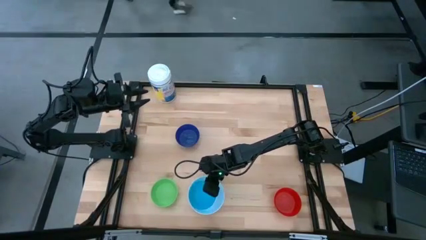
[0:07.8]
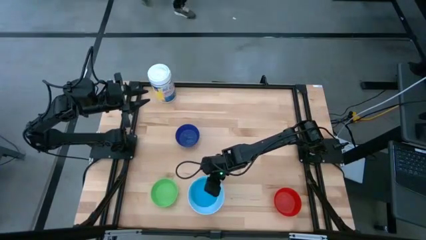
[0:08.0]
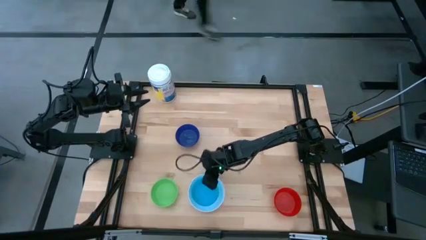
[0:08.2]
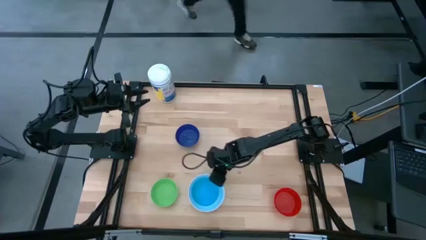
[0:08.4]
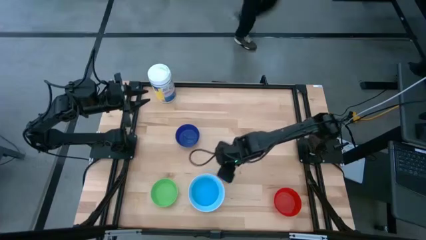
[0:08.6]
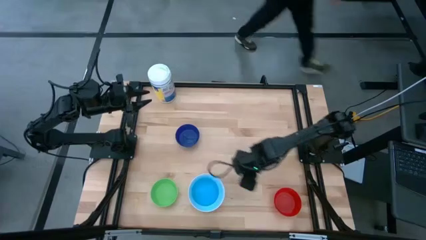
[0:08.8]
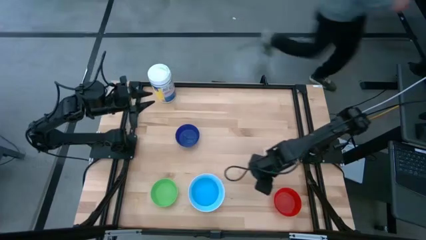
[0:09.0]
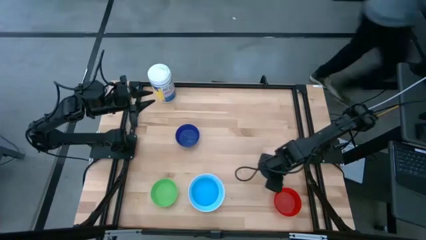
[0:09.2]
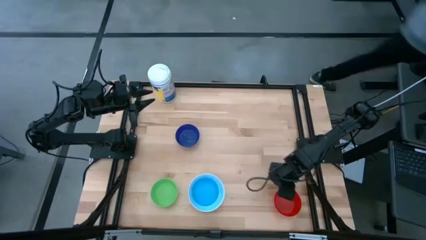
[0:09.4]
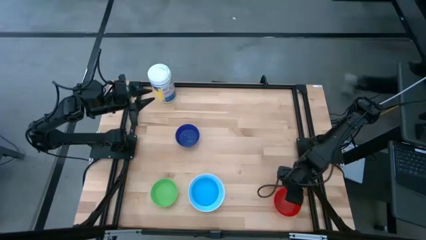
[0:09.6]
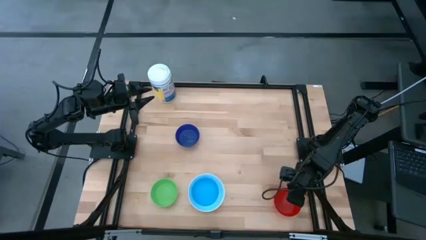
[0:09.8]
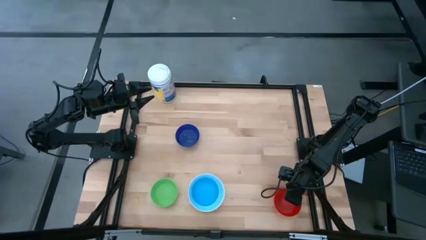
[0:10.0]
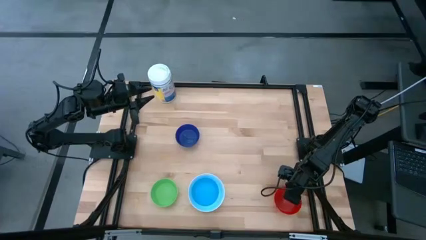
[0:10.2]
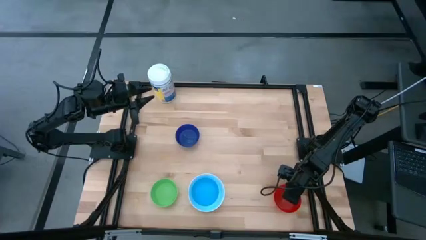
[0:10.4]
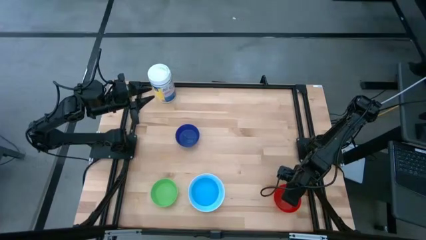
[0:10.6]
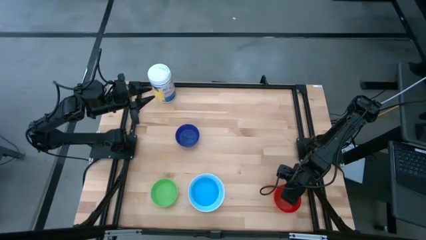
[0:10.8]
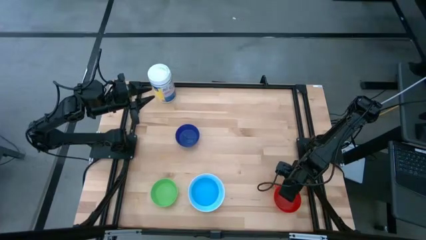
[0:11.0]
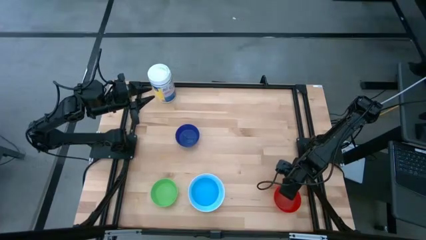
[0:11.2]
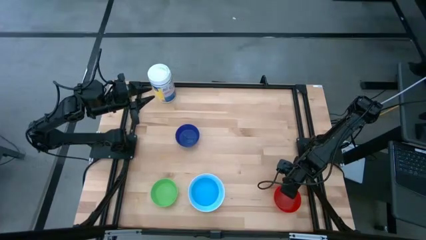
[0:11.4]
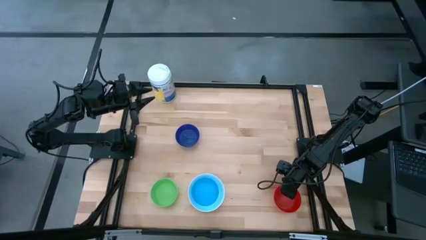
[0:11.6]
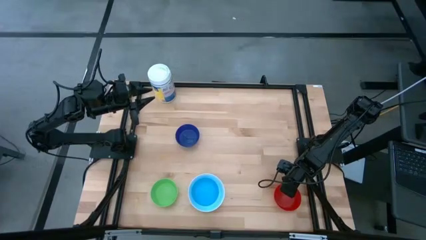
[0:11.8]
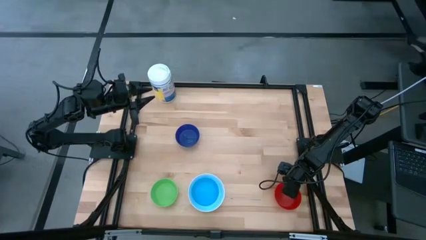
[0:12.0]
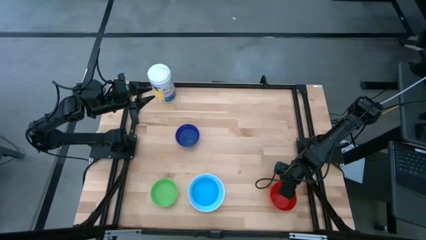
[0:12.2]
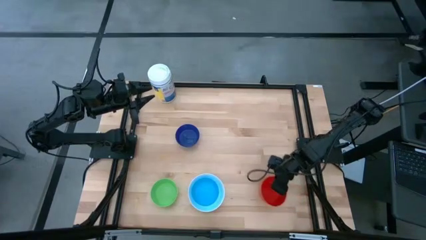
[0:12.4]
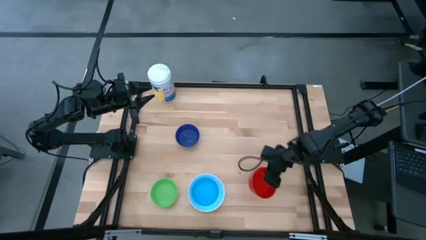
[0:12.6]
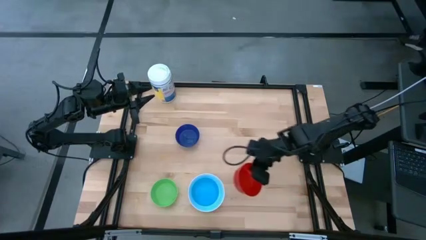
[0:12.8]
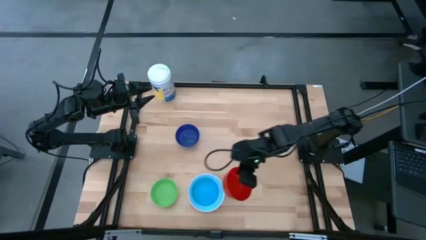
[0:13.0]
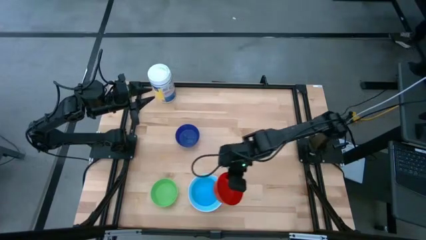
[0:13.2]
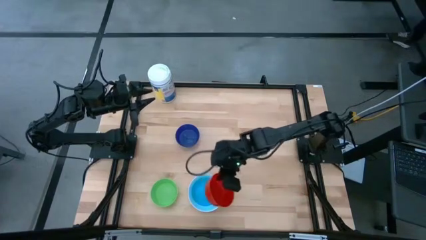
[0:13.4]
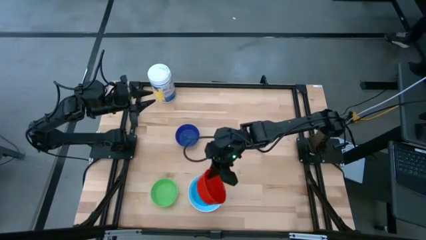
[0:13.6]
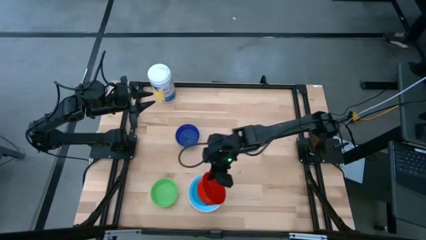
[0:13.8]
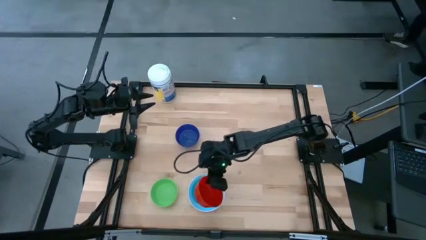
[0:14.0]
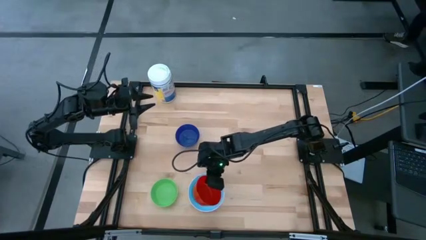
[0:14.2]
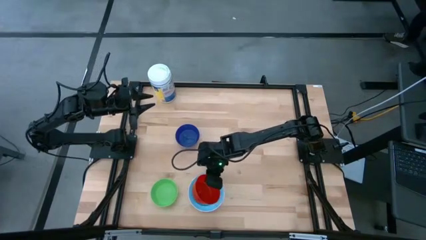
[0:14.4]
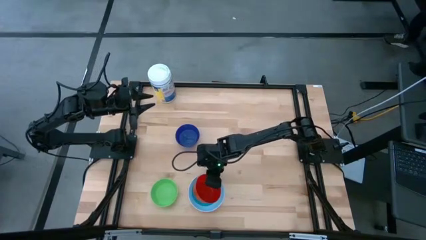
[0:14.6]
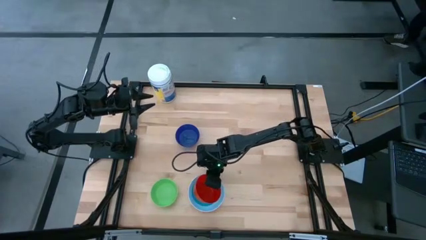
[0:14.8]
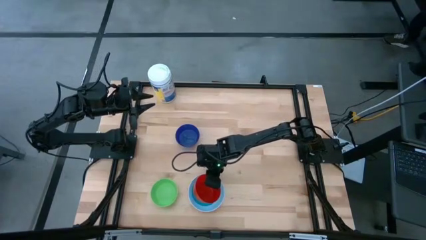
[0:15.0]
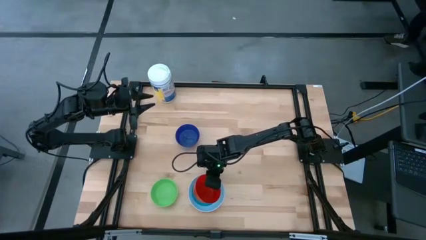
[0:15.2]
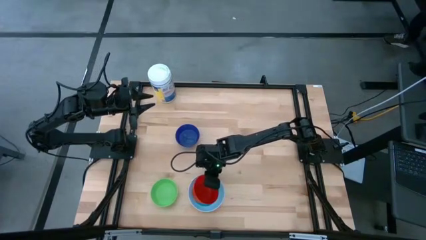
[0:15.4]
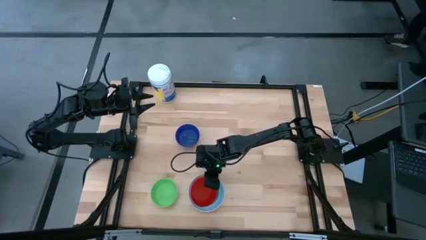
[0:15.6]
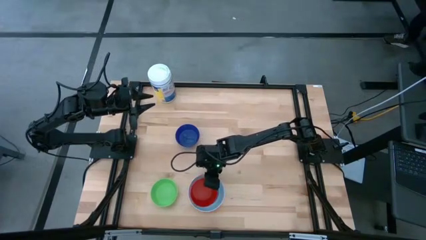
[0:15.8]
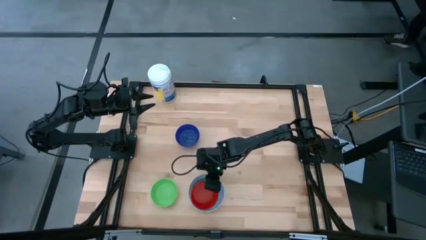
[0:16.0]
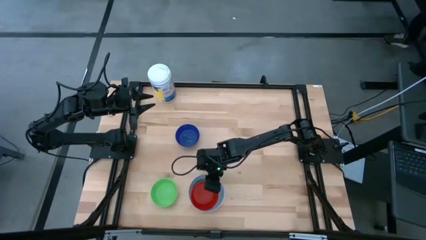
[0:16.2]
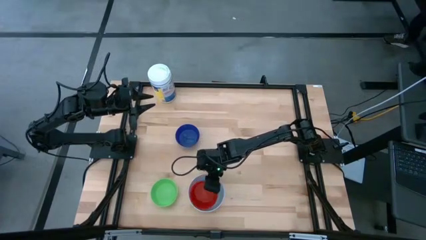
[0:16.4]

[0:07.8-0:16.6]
Stack the red bowl on top of the light blue bowl

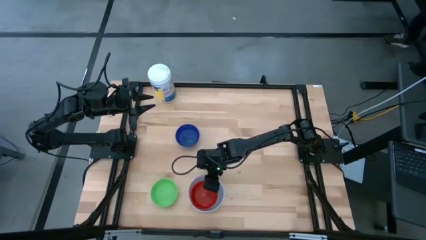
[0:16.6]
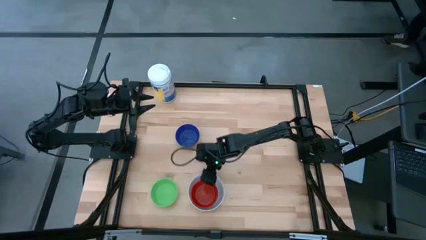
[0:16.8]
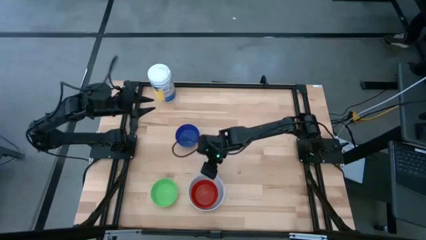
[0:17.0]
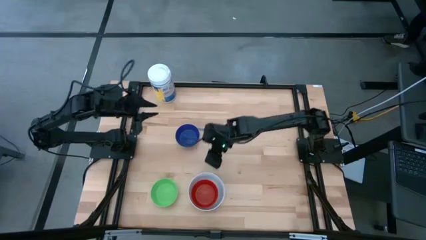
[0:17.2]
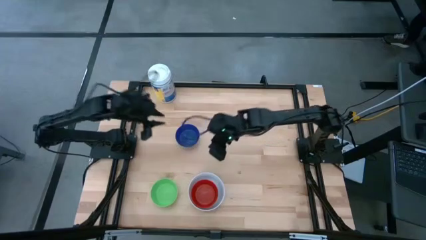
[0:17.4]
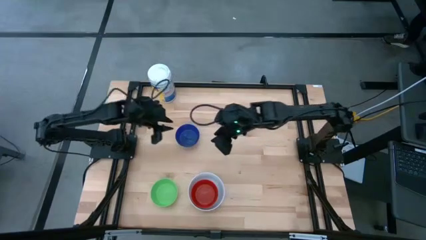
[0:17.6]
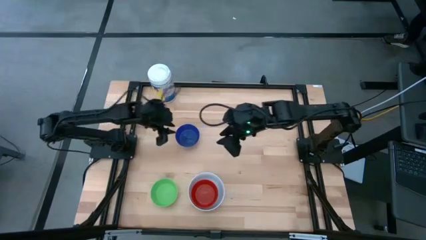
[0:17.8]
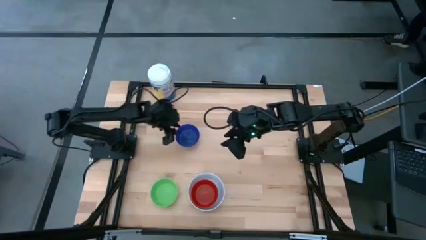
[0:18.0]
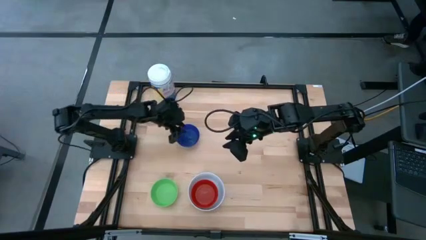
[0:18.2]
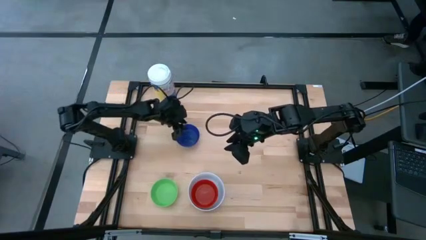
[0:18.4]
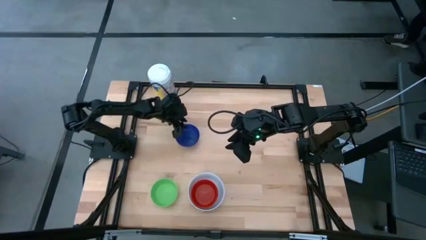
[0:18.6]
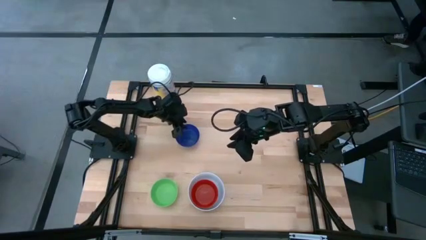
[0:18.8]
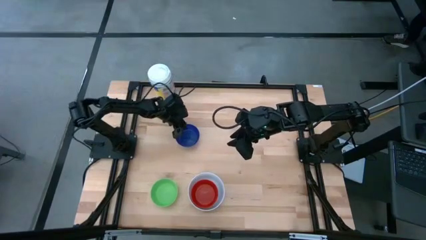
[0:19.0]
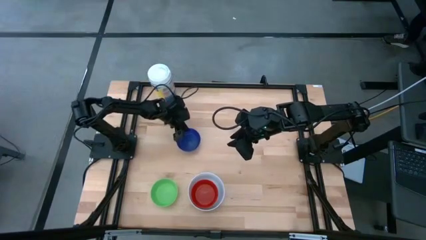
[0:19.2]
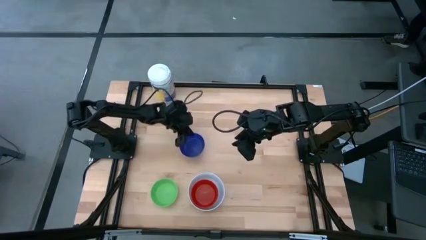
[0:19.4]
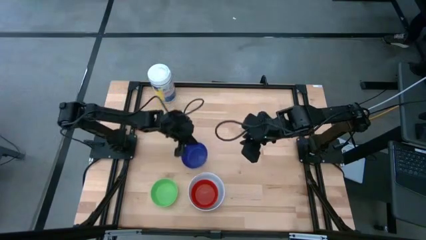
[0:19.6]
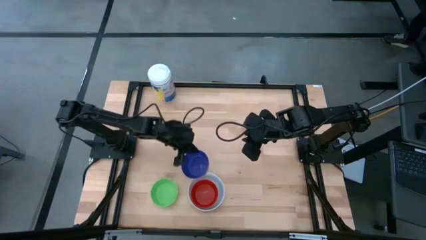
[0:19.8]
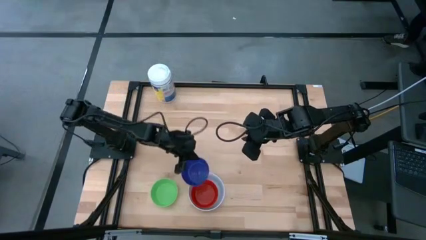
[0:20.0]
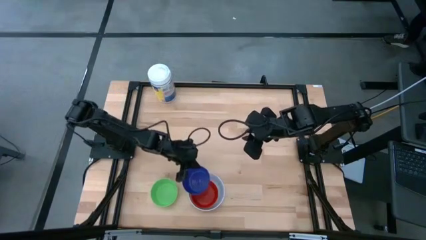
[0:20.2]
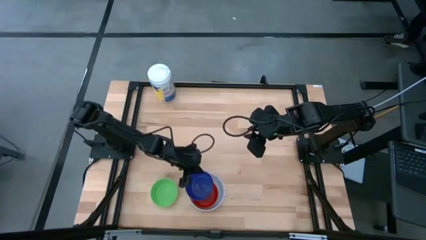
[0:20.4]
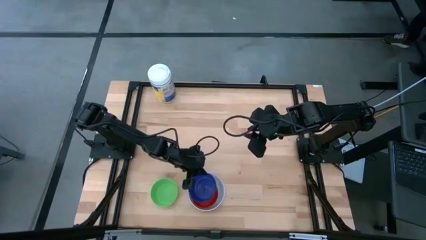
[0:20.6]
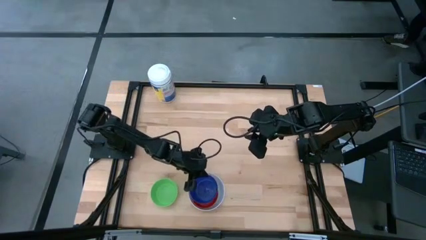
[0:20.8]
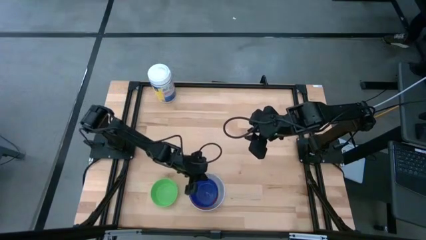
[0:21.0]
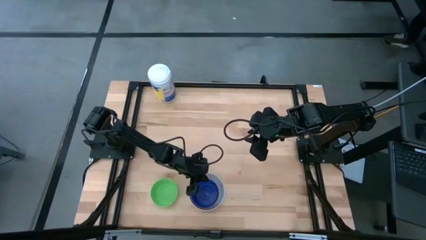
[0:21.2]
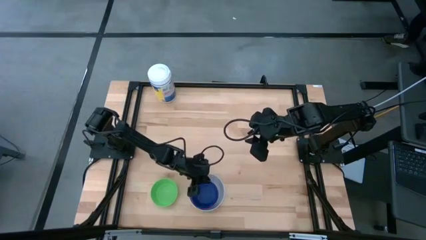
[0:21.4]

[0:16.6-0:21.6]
Stack the blue bowl on top of the red bowl

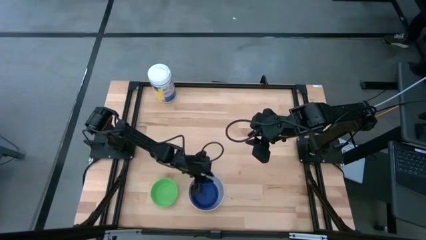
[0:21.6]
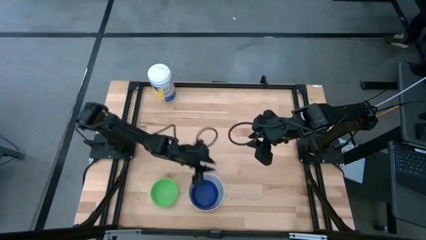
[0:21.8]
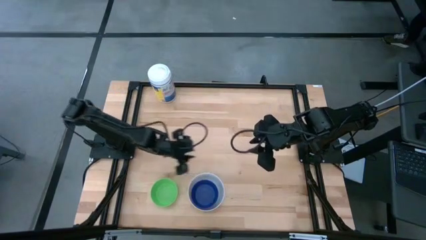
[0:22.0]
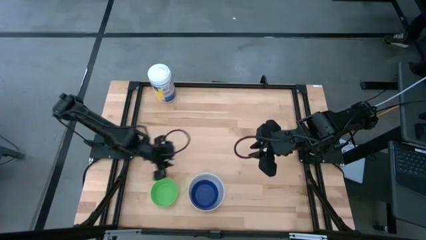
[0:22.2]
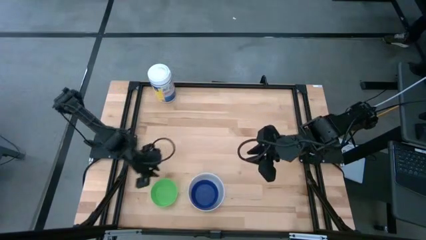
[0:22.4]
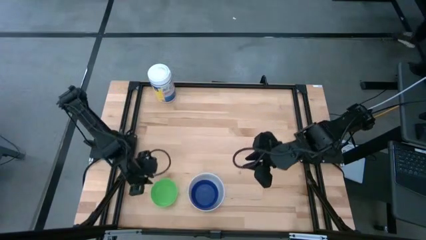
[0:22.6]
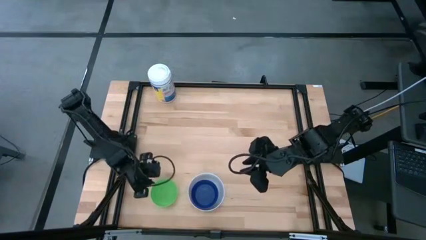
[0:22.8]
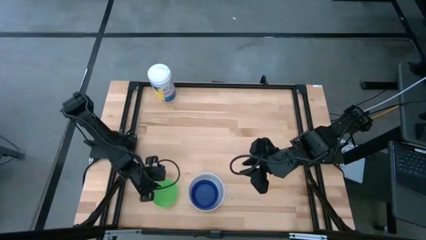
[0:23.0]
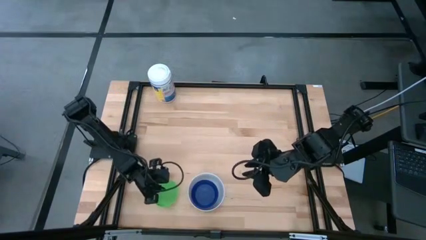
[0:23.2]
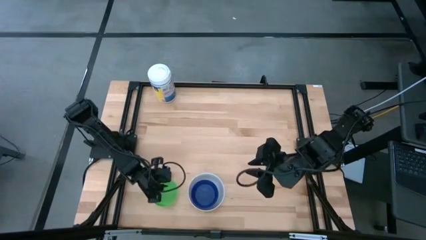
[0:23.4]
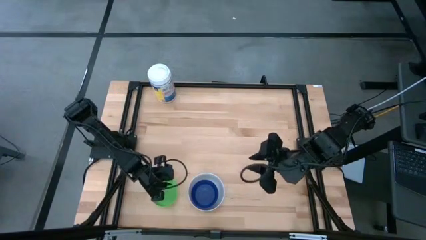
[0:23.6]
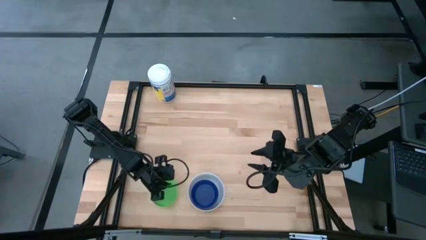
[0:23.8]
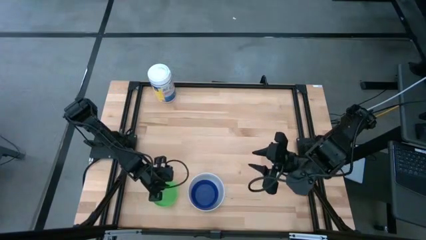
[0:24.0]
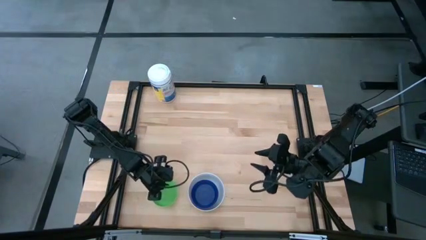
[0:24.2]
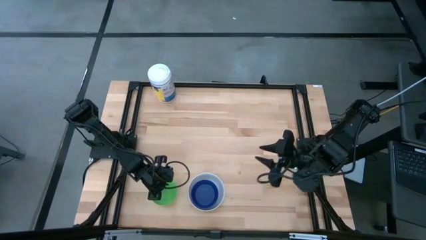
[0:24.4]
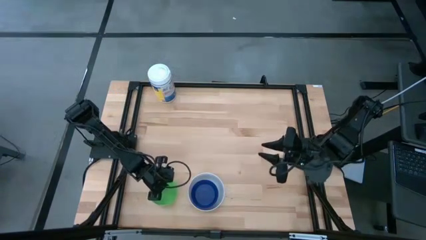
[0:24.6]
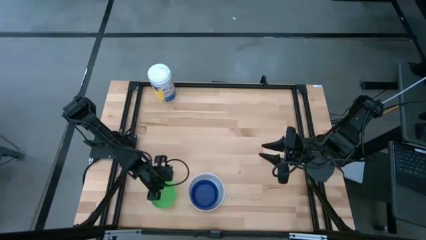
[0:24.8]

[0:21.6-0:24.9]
Stack the green bowl on top of the blue bowl
